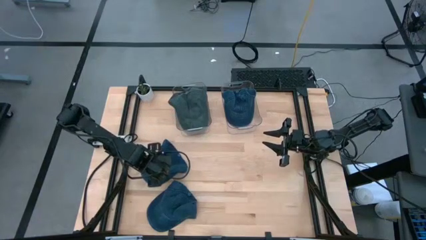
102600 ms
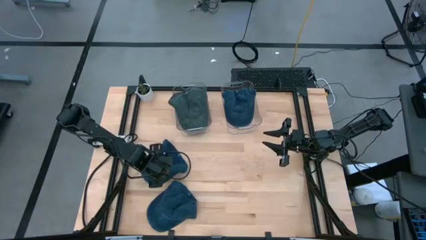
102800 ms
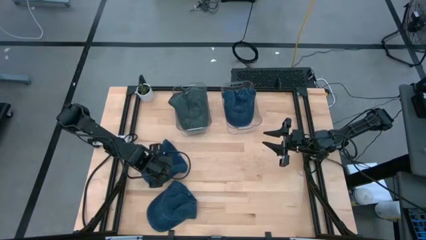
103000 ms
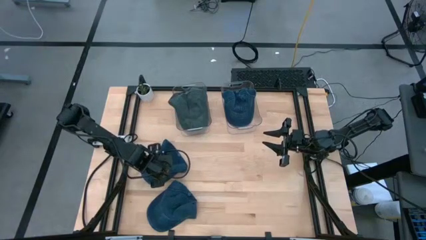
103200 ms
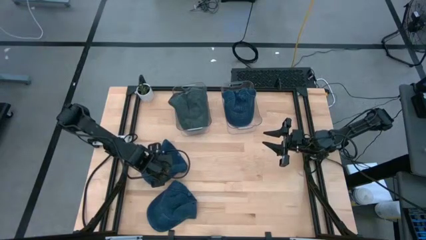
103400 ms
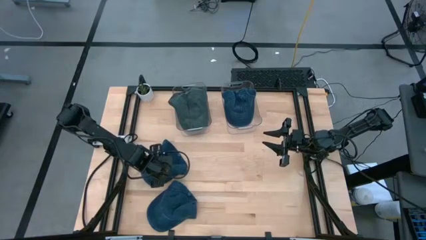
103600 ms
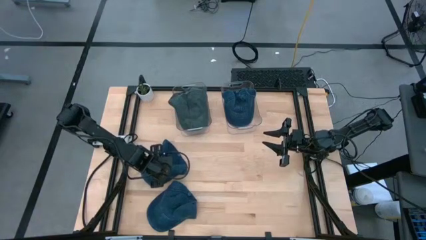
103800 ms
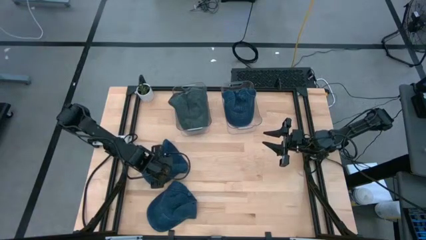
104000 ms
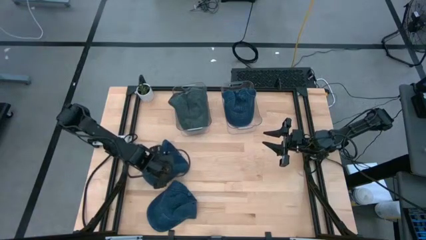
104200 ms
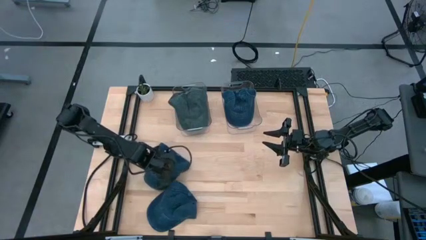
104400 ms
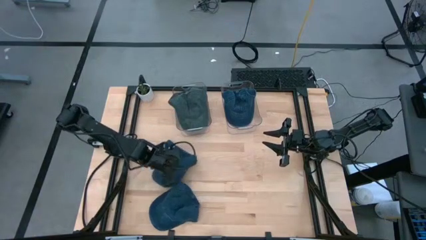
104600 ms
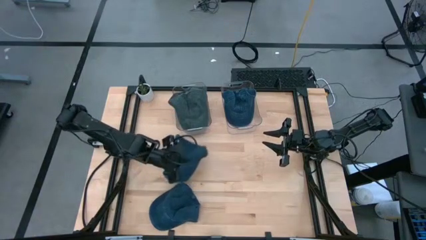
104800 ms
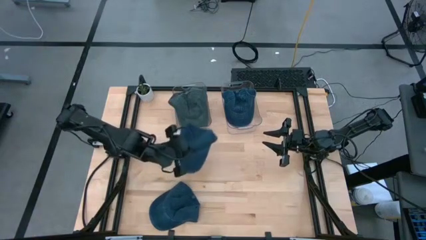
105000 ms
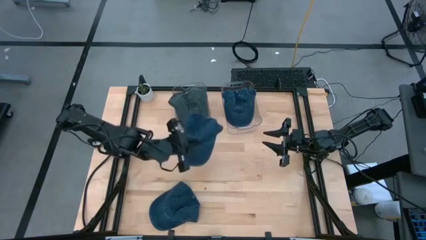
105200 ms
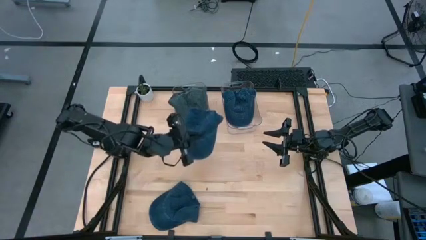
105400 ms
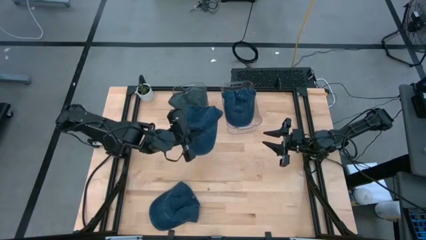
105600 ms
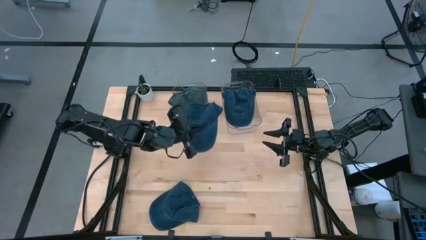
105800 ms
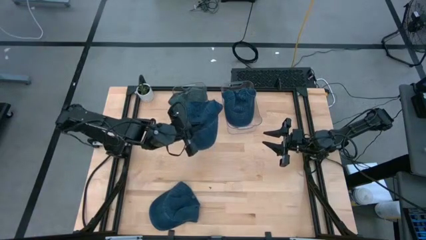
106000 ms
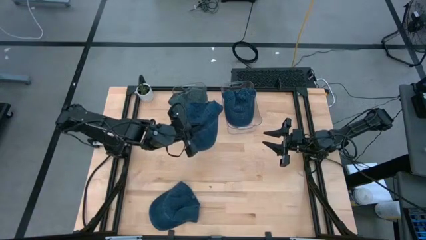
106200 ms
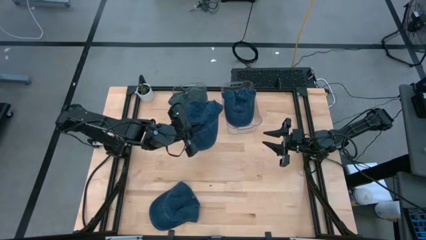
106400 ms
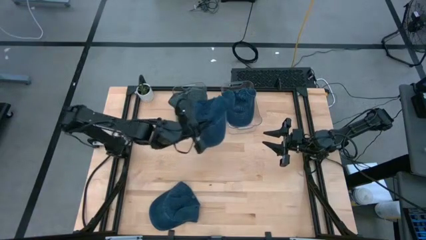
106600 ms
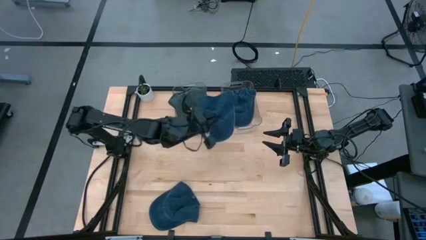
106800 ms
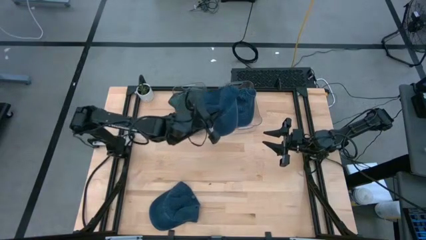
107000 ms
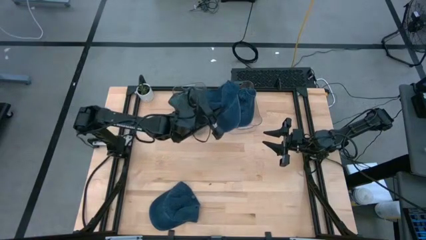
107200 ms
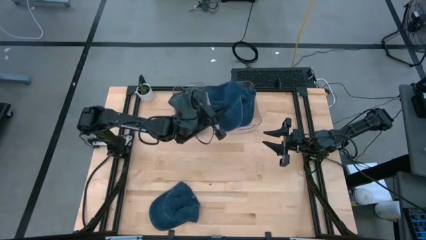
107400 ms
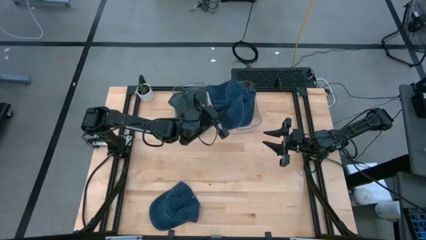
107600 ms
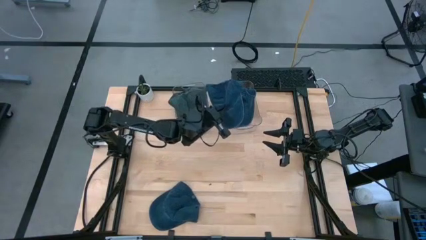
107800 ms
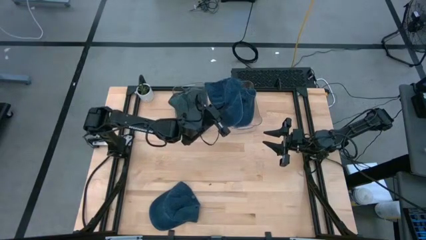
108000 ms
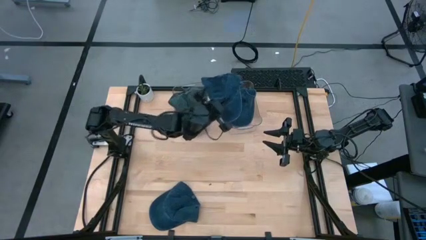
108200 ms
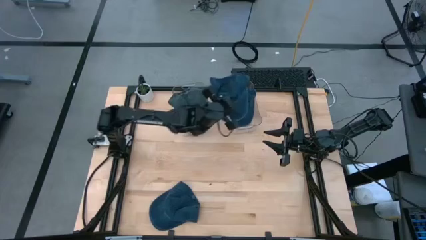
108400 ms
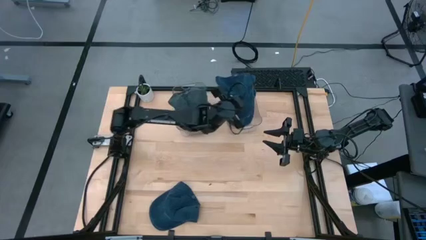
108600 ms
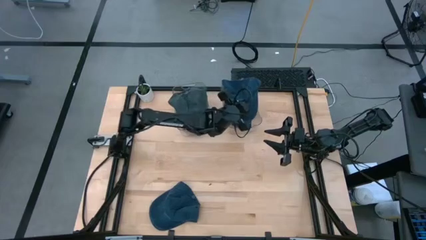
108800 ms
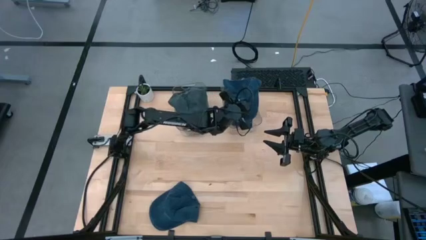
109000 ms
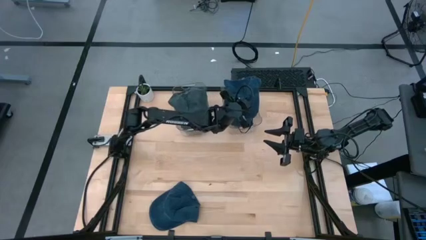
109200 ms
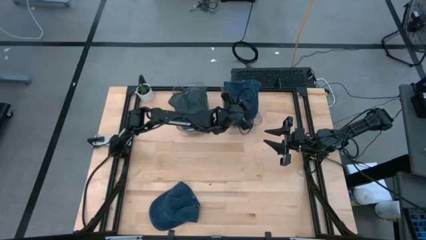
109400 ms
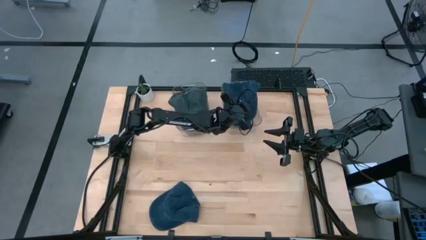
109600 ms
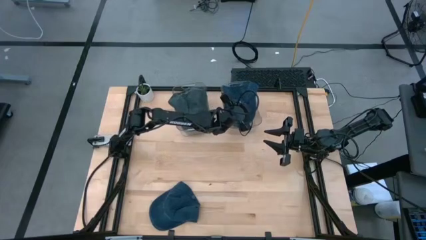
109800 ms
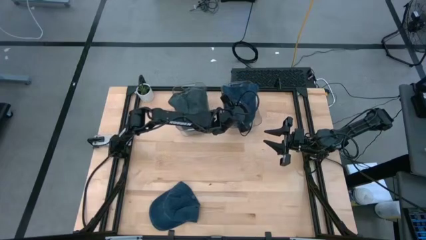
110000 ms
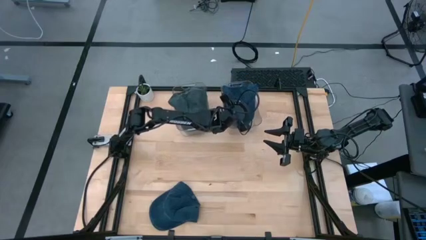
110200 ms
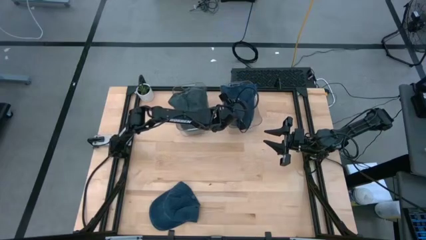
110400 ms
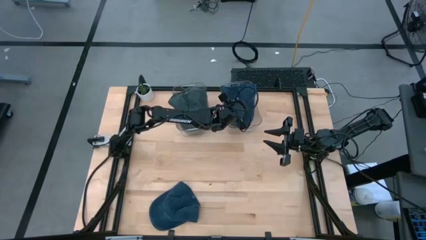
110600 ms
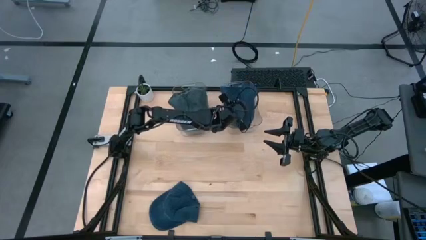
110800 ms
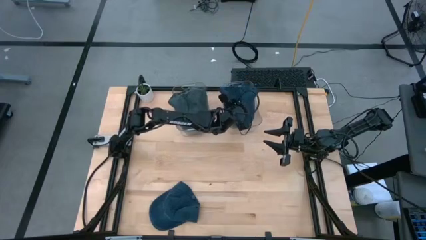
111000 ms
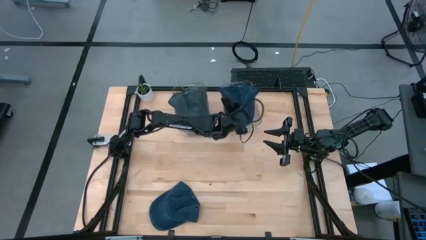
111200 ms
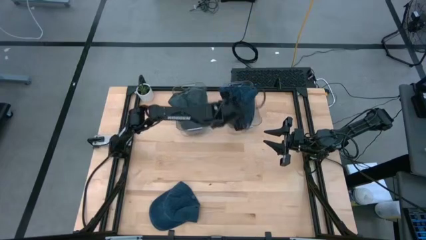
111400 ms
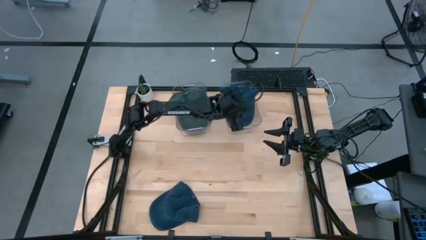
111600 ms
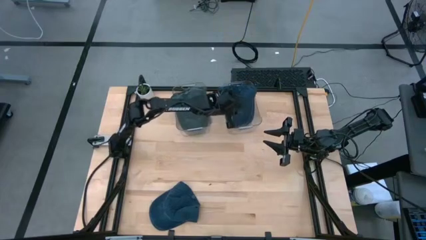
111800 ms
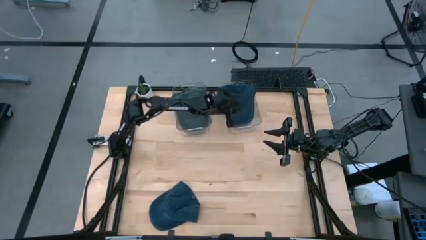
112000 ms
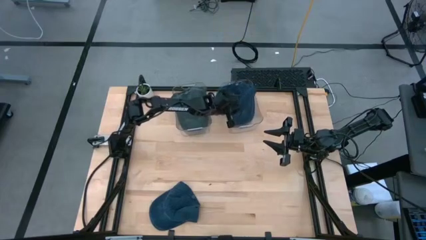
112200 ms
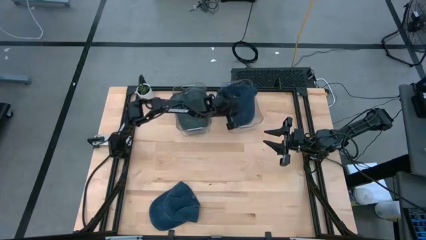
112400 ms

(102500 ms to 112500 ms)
Task: Pick & Place hat
Put the top blue cap into the right transparent bin
